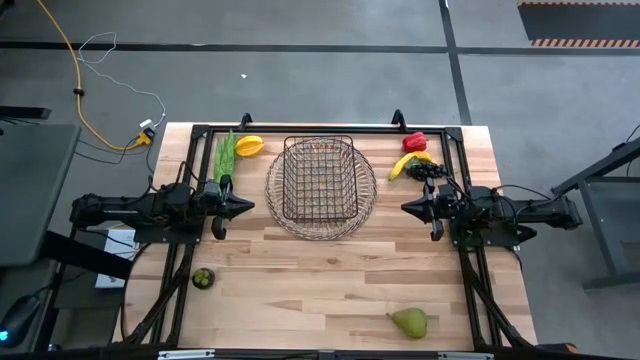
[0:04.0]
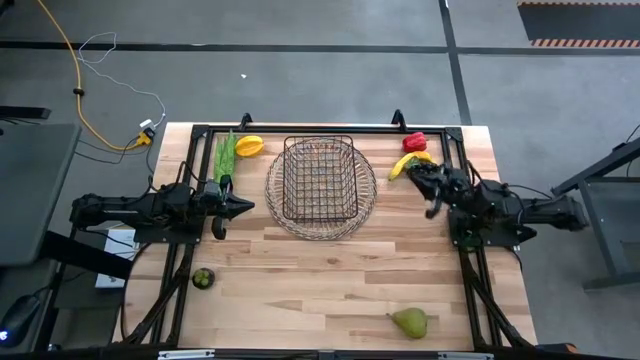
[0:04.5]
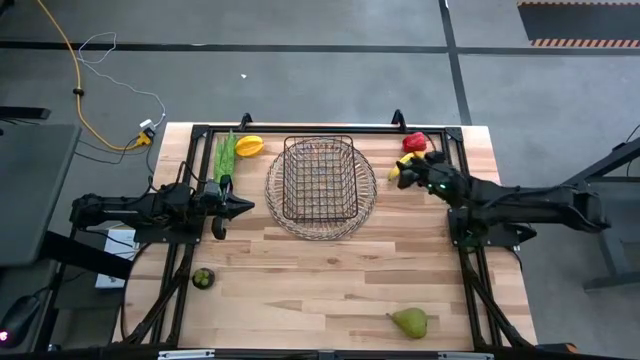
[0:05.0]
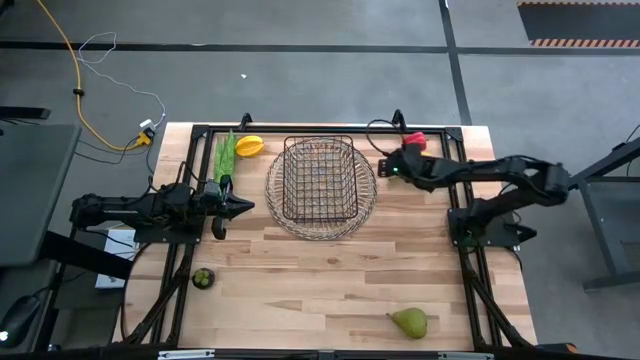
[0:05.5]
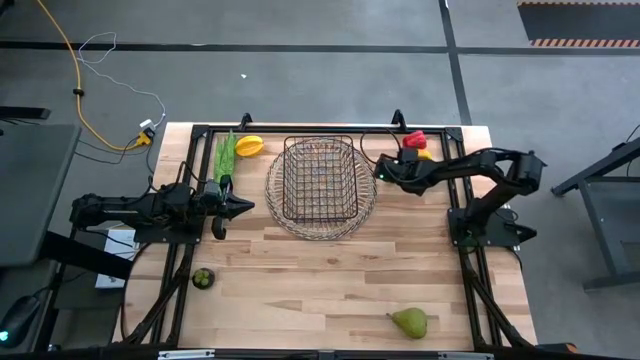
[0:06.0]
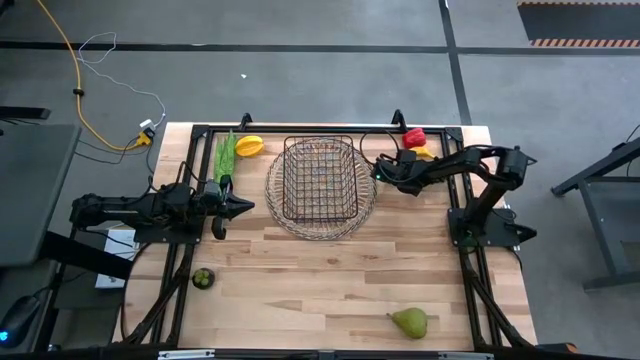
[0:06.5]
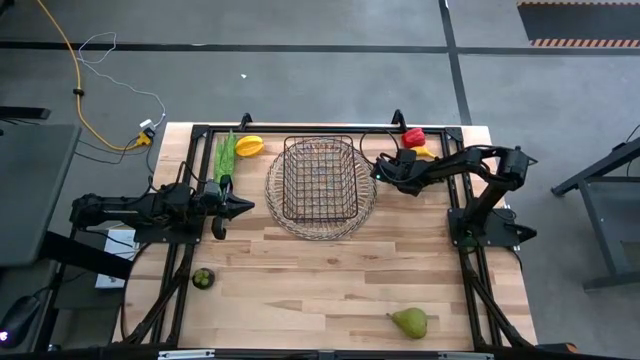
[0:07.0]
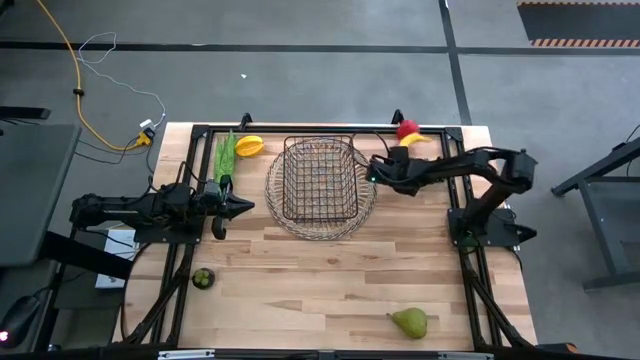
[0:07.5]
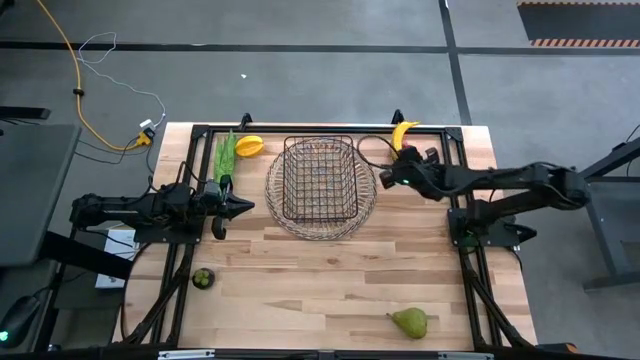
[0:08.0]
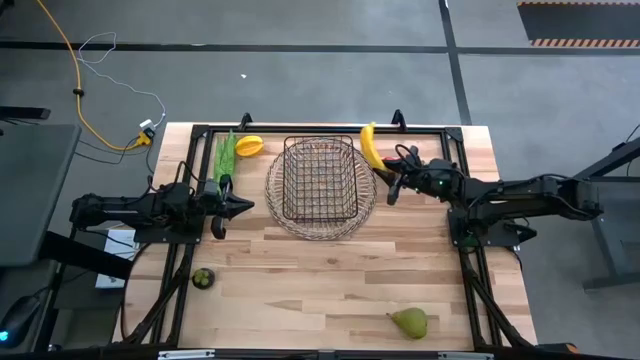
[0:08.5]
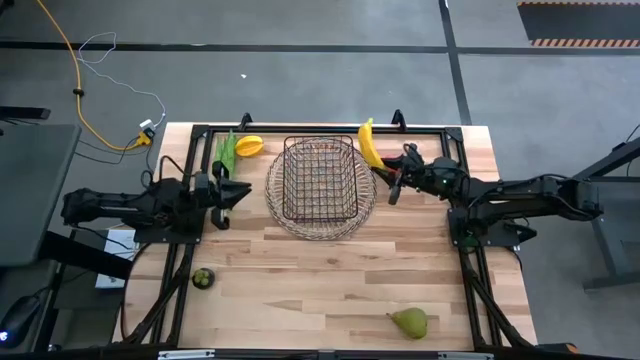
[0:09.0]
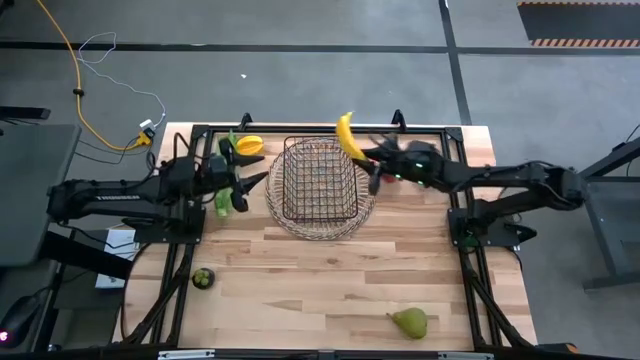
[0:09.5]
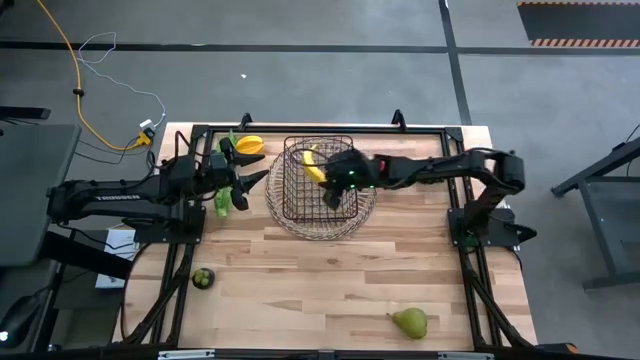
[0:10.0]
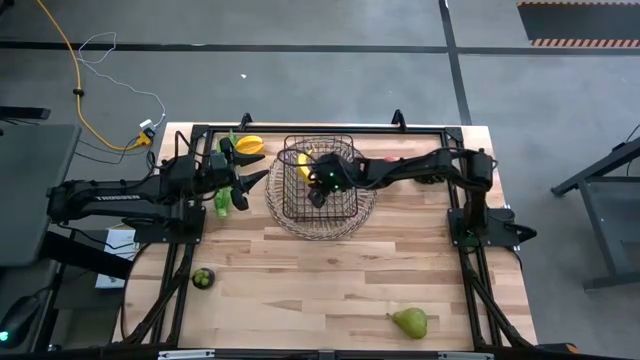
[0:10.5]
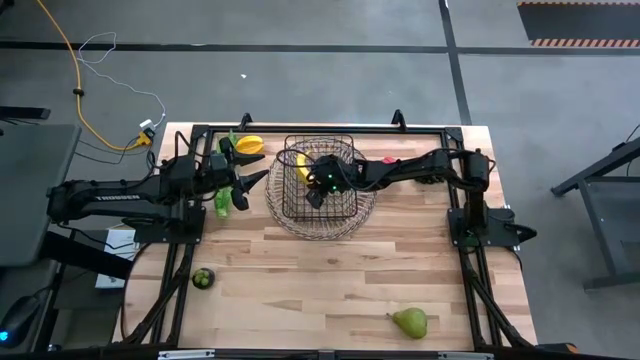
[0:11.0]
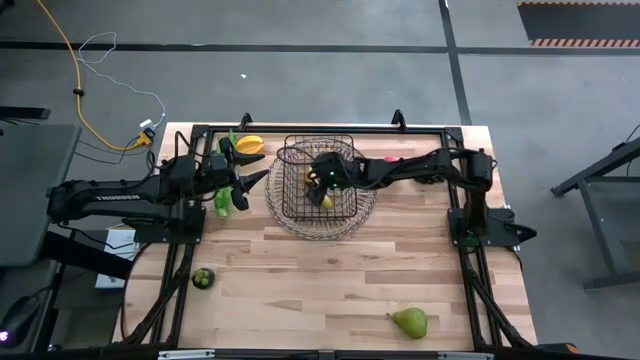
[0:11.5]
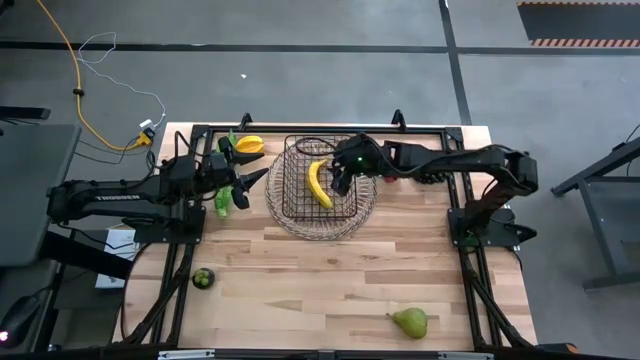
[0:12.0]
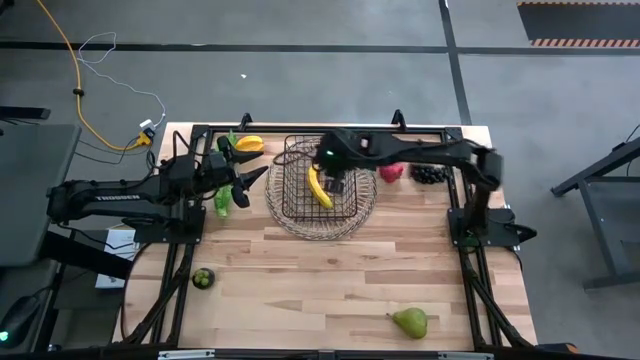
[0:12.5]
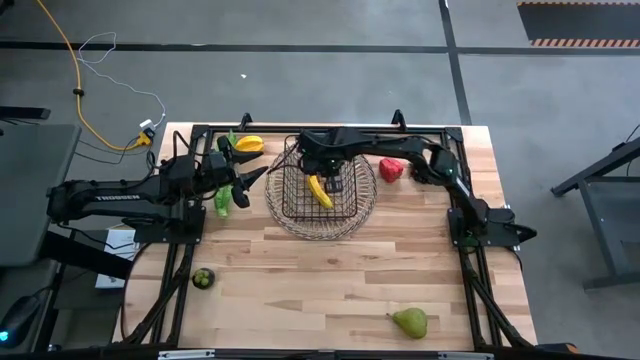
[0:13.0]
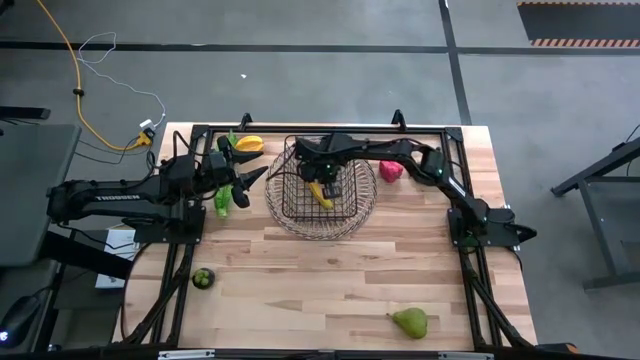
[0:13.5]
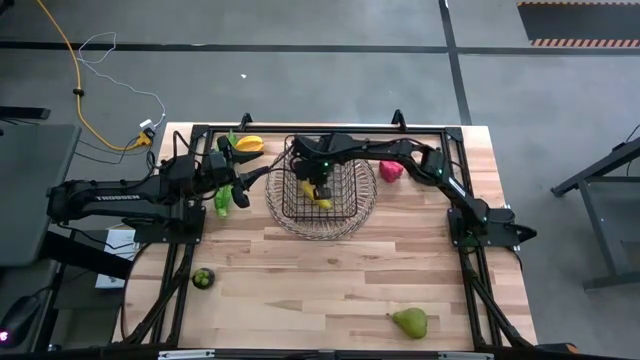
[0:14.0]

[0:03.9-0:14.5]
Task: Build produce basket
Put the yellow banana into the black wire basket

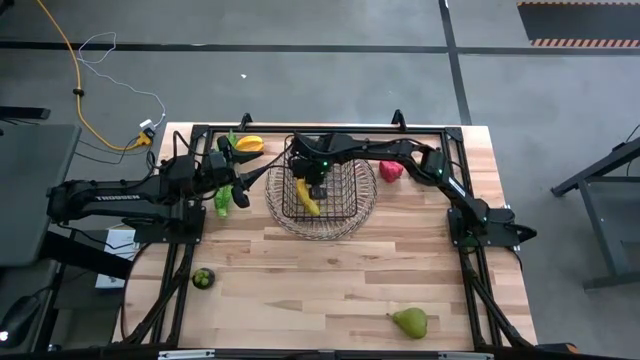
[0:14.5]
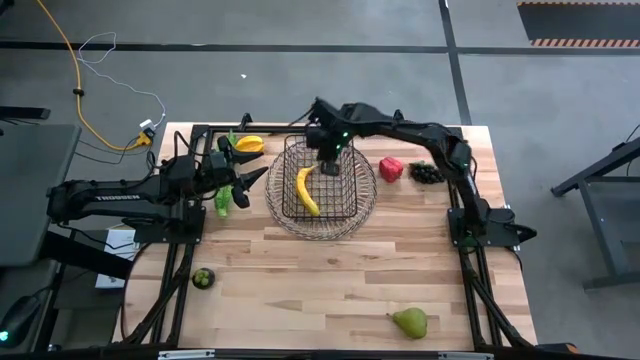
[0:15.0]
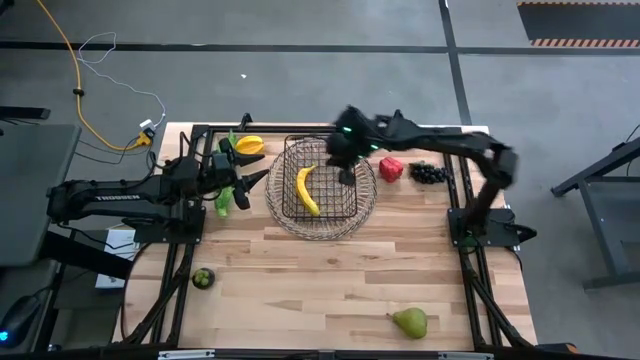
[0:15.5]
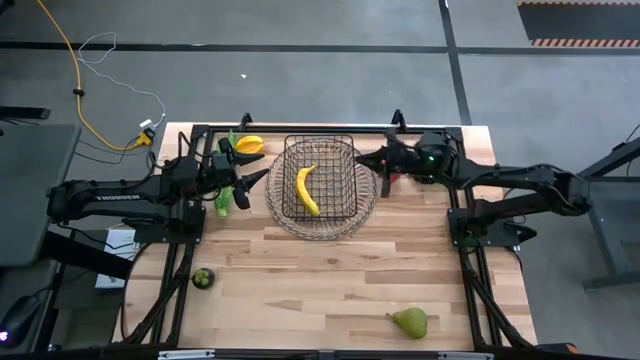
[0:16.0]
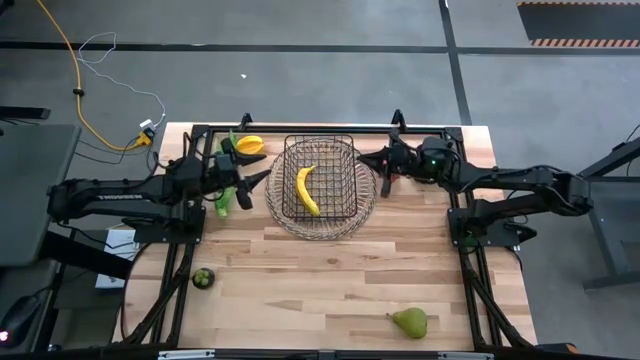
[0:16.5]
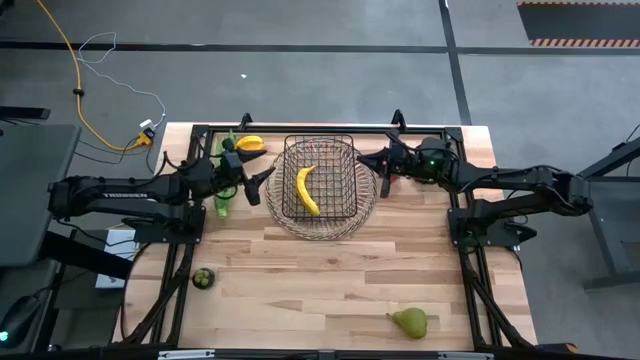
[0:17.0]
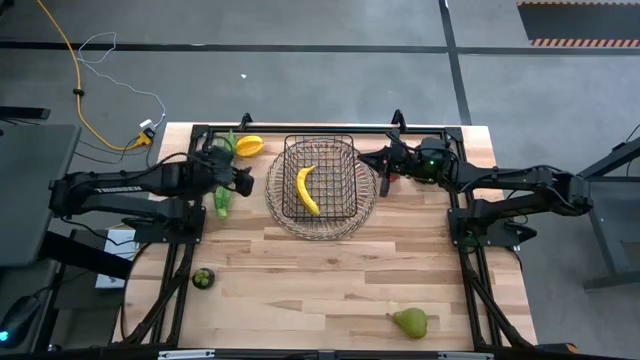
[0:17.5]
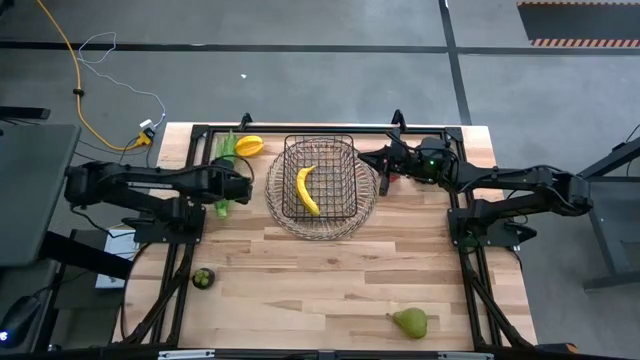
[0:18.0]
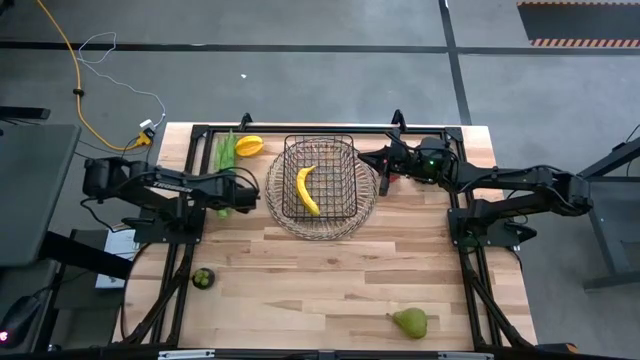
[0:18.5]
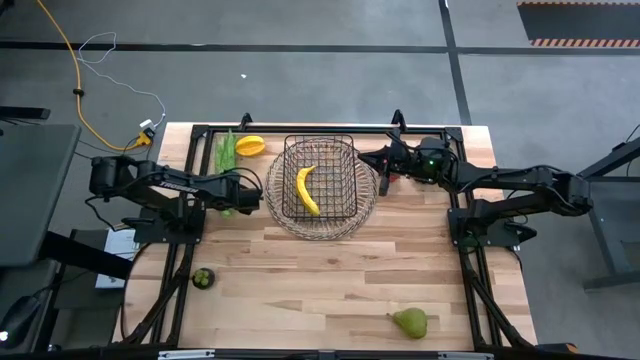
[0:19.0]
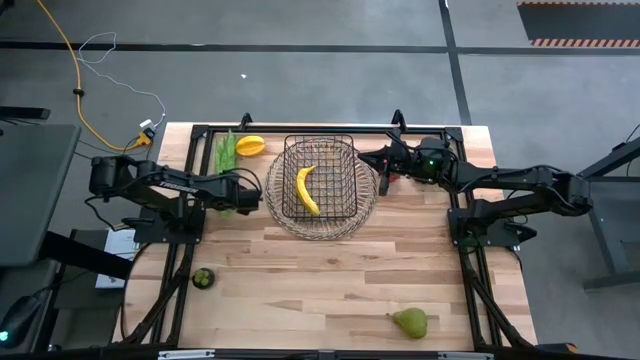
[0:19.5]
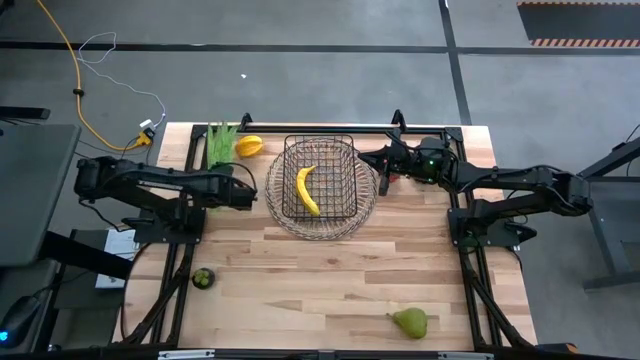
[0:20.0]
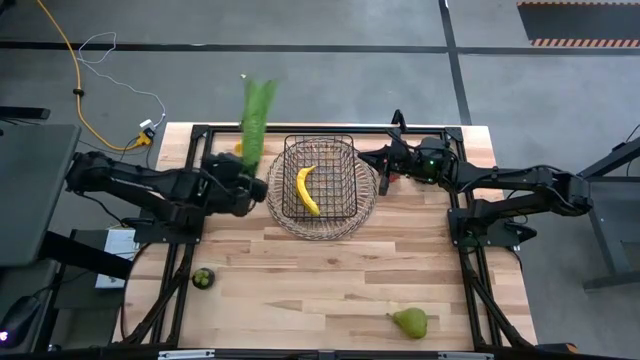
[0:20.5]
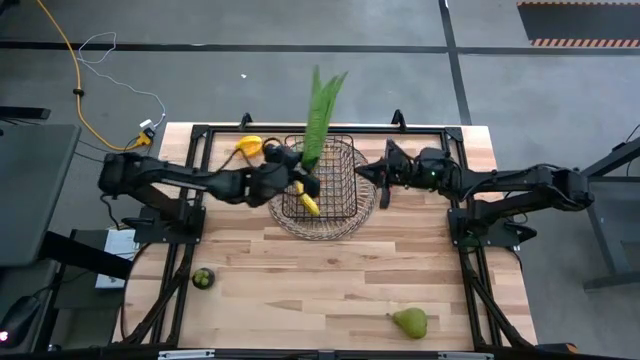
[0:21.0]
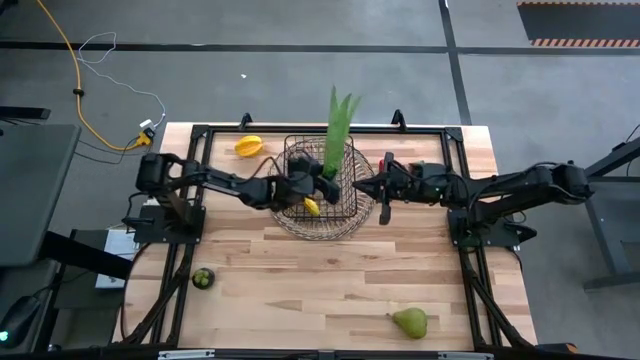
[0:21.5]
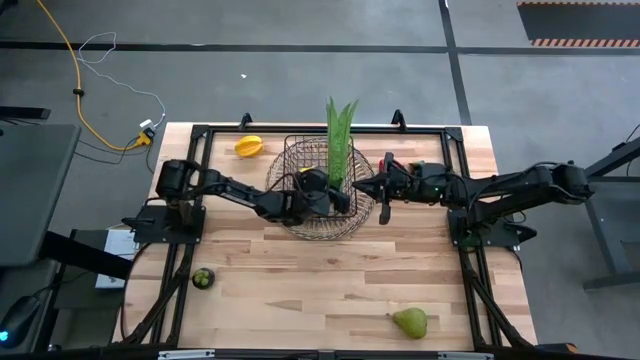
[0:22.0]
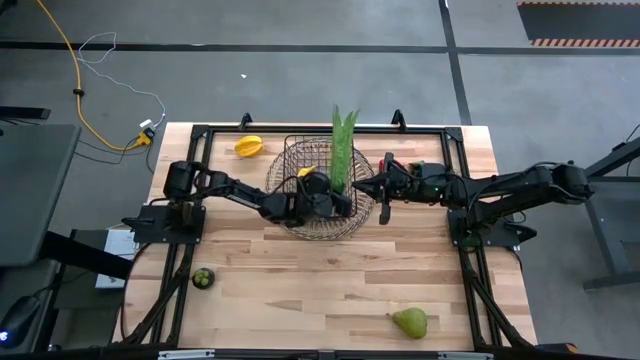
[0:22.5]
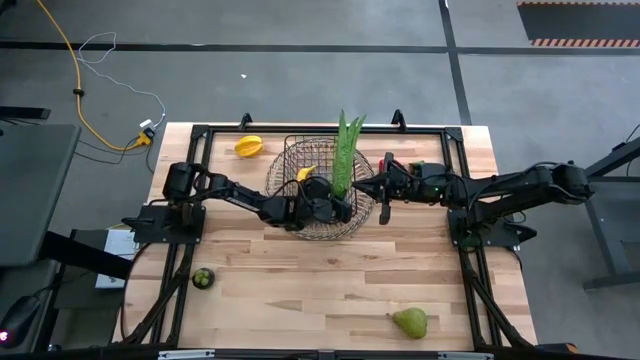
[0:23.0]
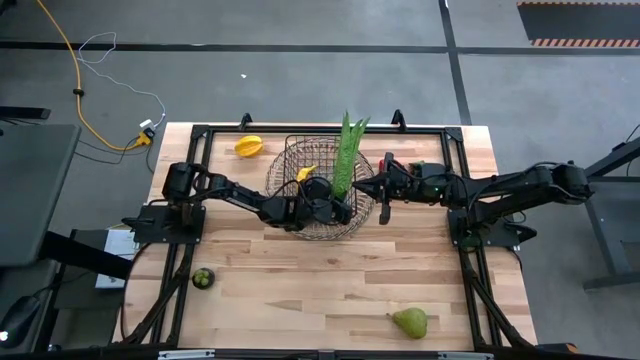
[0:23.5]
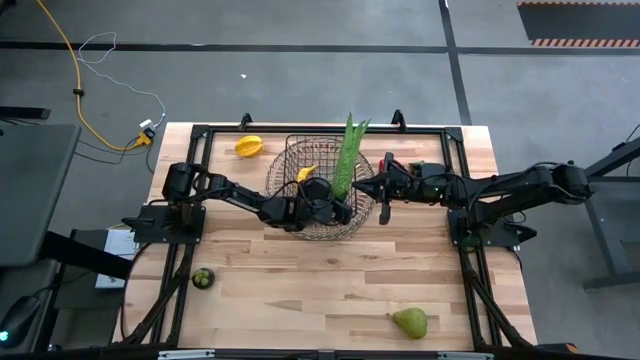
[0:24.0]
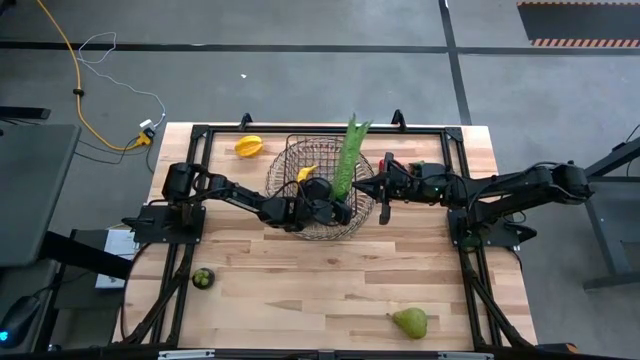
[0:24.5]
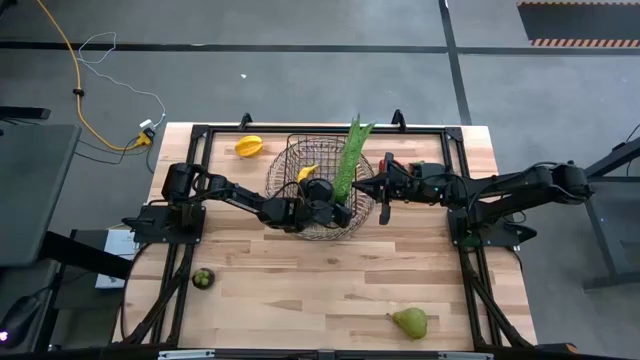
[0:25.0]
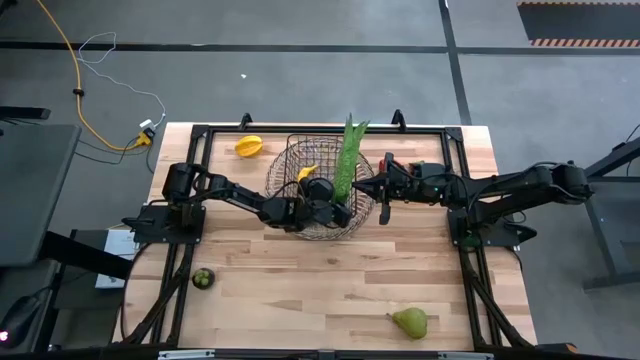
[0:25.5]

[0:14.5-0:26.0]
Put the leaf lettuce into the black wire basket

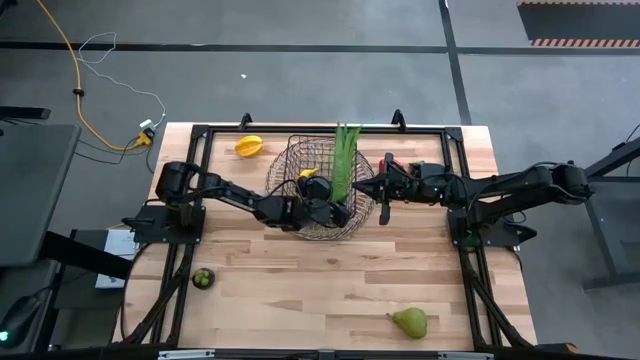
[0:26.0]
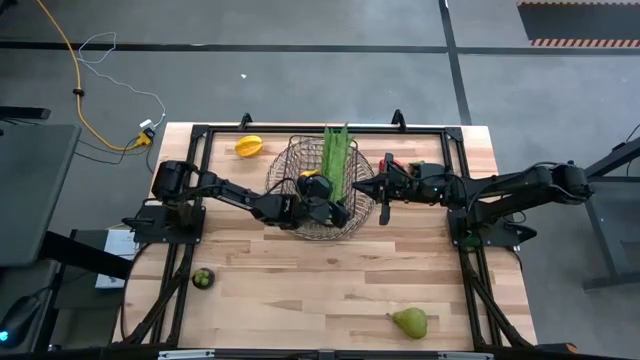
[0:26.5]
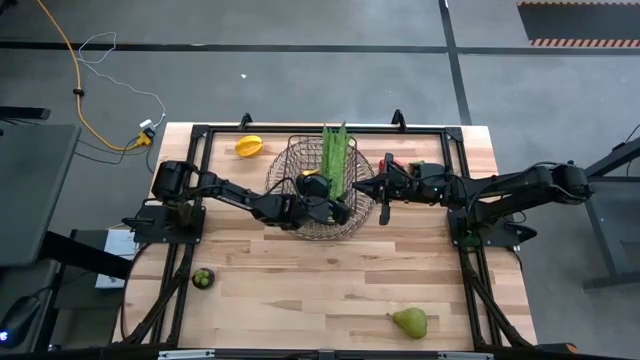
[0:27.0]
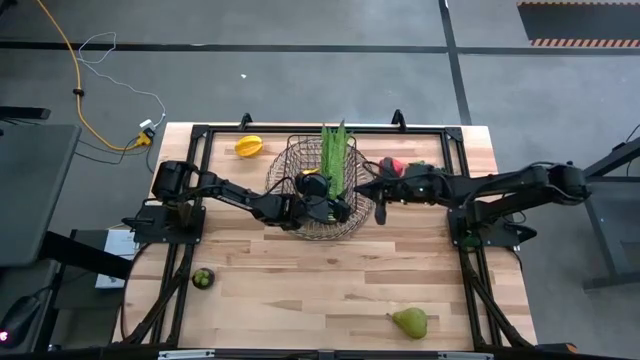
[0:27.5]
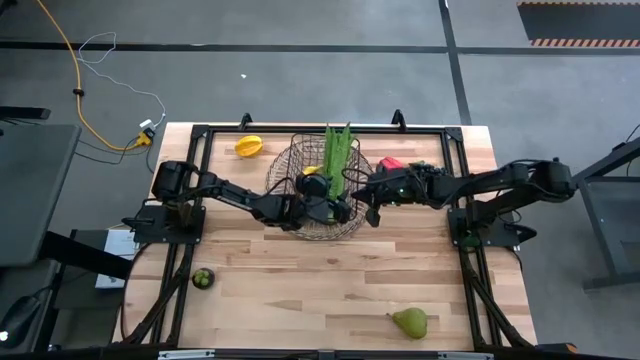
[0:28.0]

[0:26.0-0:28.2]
Adjust the black wire basket
